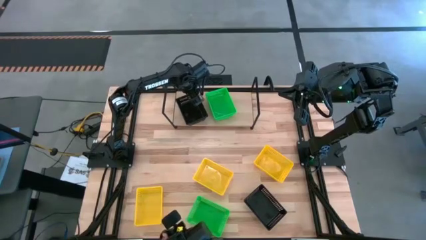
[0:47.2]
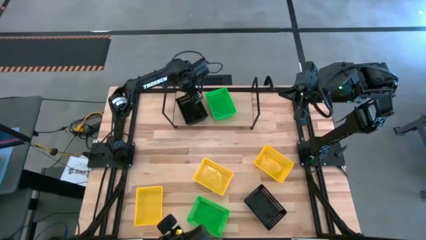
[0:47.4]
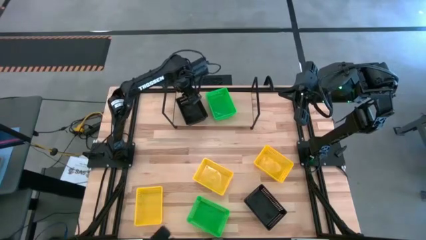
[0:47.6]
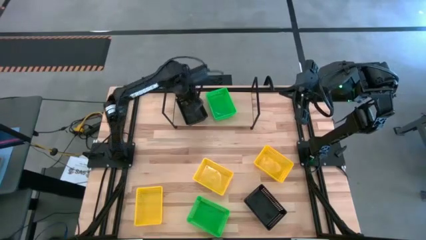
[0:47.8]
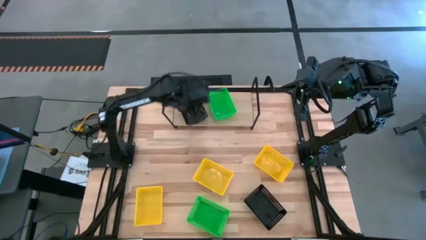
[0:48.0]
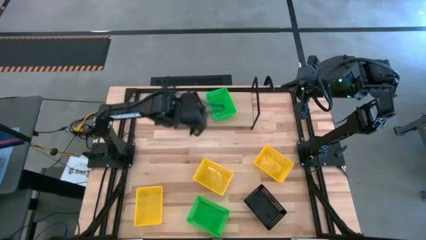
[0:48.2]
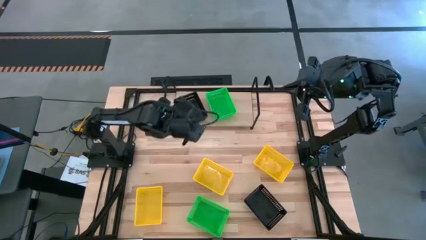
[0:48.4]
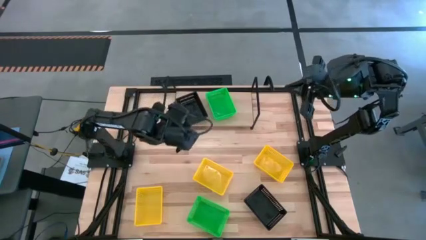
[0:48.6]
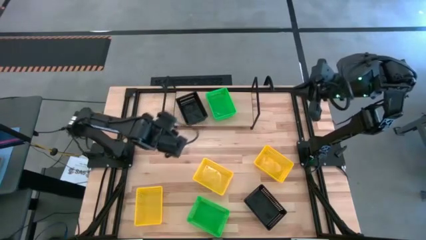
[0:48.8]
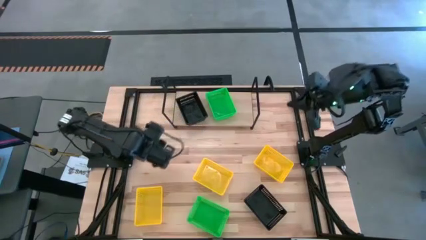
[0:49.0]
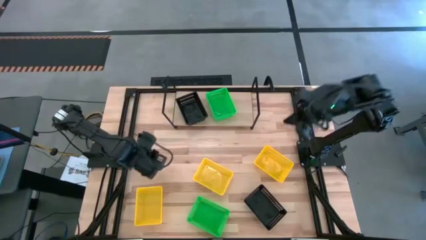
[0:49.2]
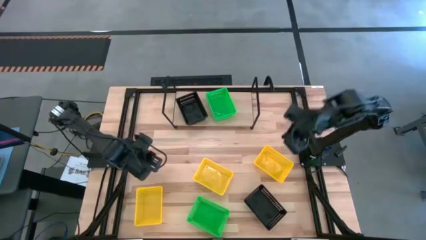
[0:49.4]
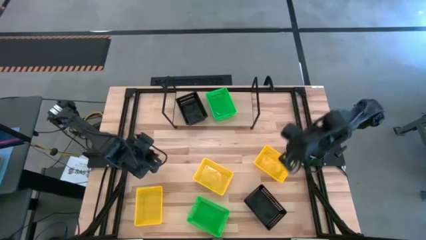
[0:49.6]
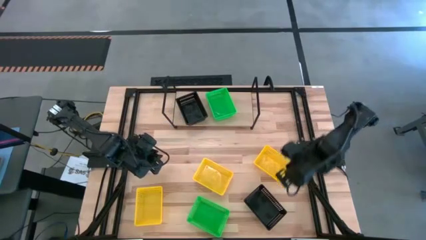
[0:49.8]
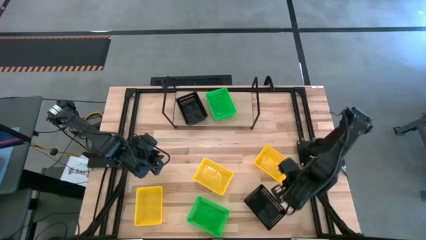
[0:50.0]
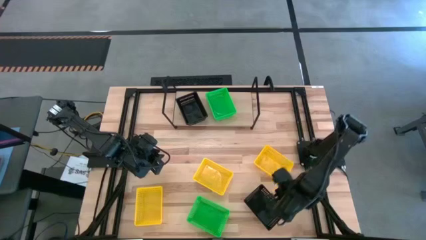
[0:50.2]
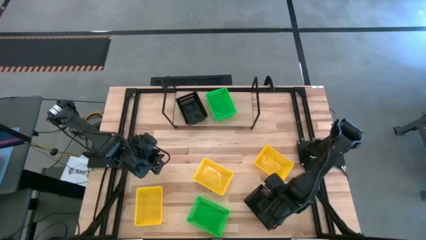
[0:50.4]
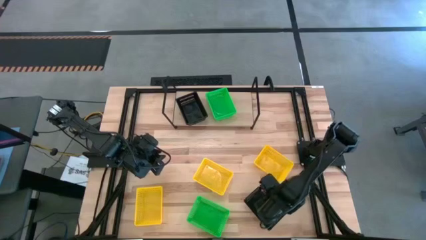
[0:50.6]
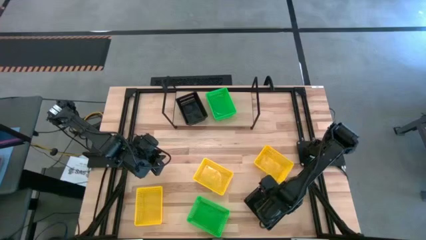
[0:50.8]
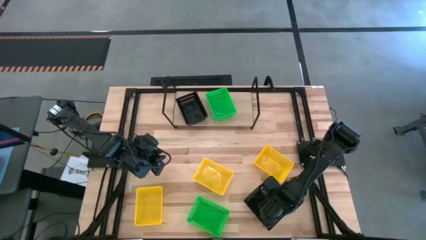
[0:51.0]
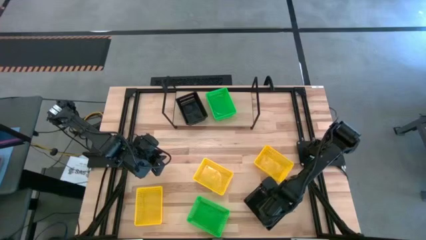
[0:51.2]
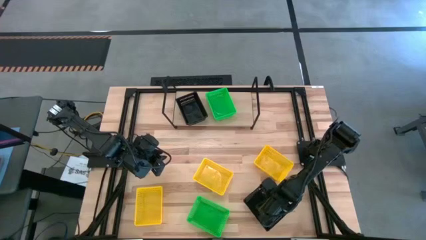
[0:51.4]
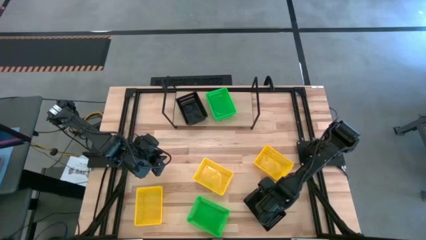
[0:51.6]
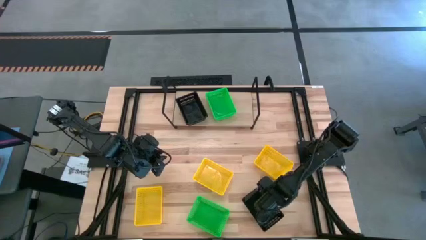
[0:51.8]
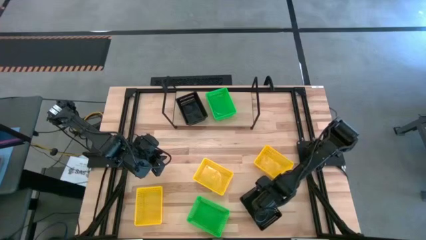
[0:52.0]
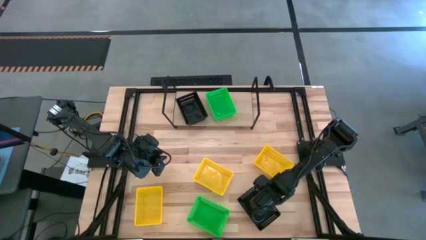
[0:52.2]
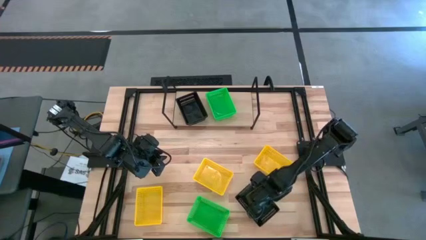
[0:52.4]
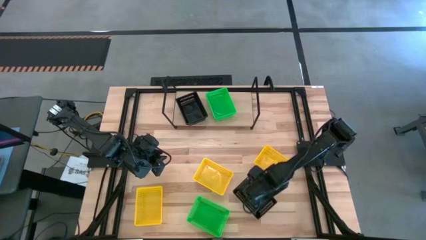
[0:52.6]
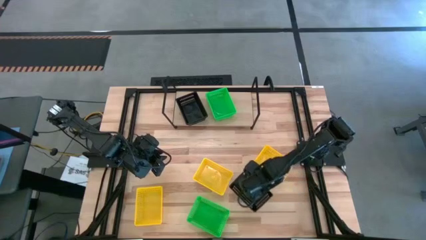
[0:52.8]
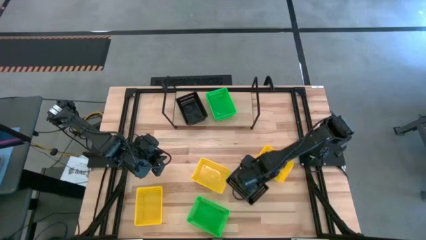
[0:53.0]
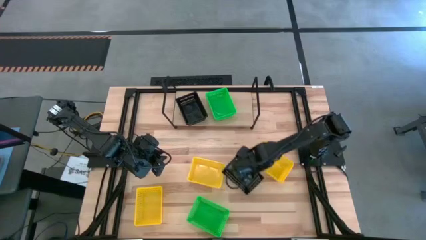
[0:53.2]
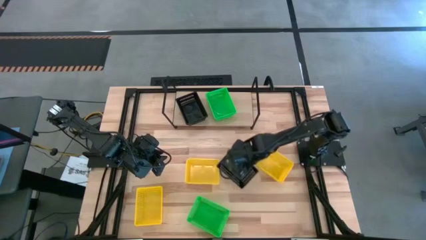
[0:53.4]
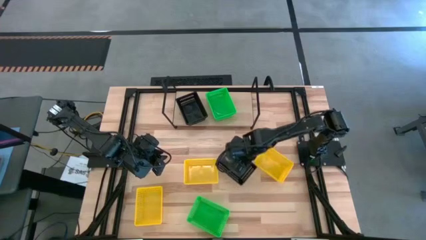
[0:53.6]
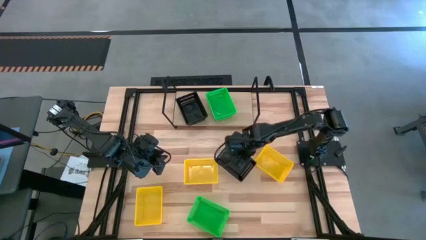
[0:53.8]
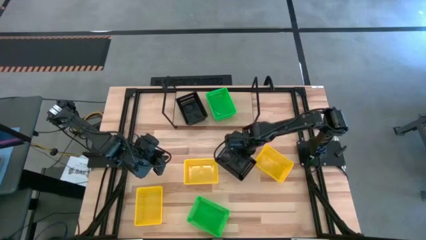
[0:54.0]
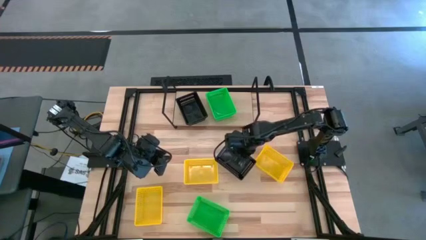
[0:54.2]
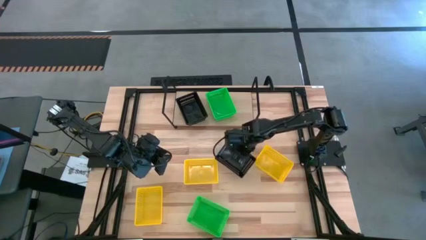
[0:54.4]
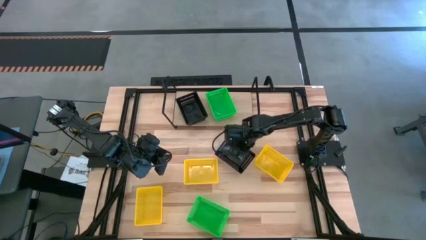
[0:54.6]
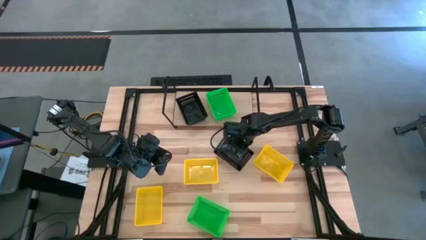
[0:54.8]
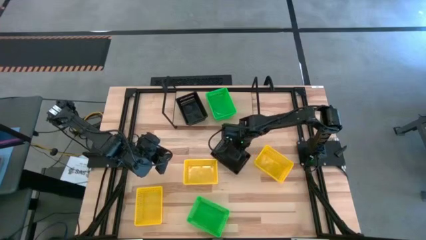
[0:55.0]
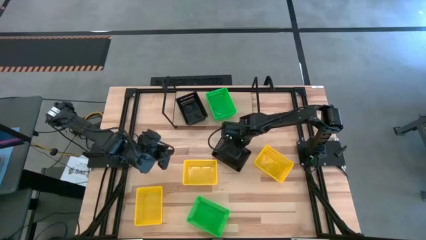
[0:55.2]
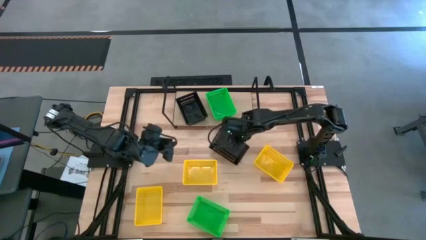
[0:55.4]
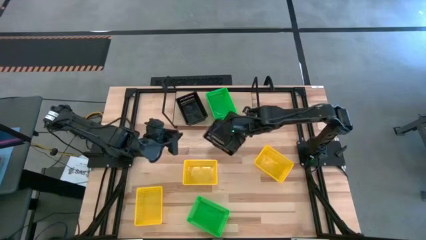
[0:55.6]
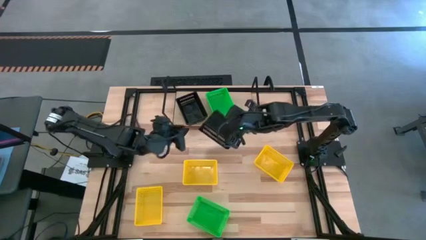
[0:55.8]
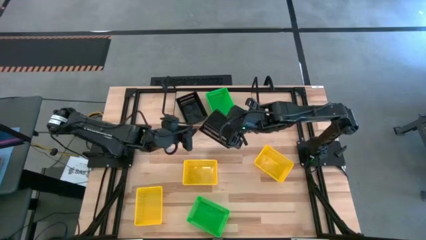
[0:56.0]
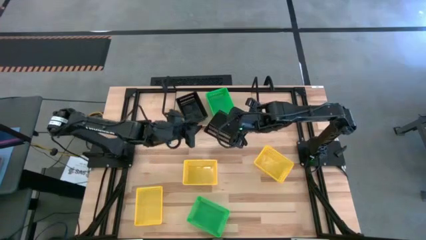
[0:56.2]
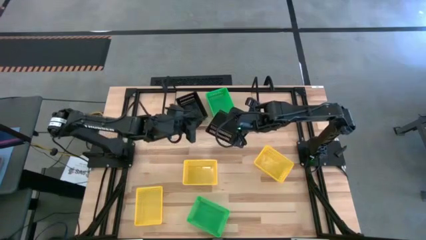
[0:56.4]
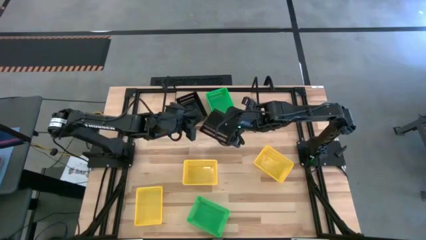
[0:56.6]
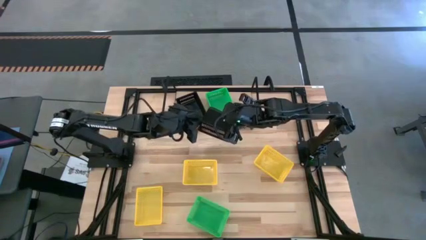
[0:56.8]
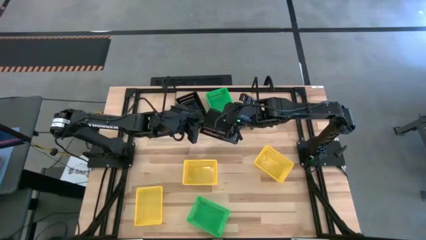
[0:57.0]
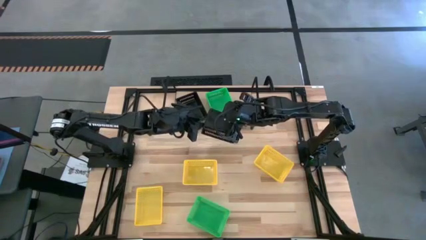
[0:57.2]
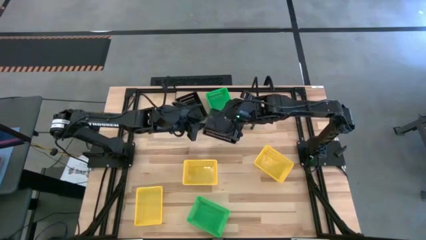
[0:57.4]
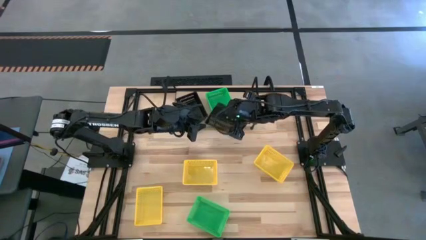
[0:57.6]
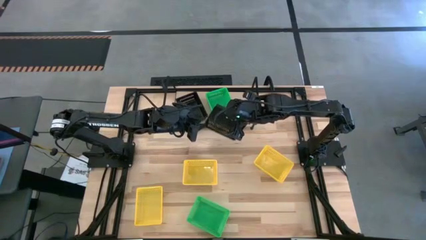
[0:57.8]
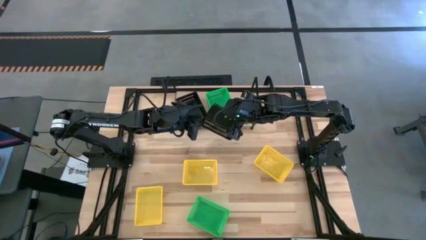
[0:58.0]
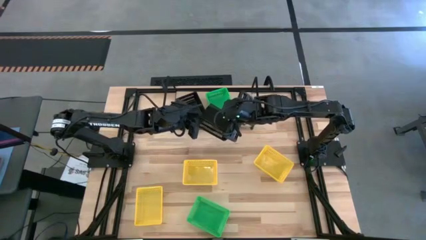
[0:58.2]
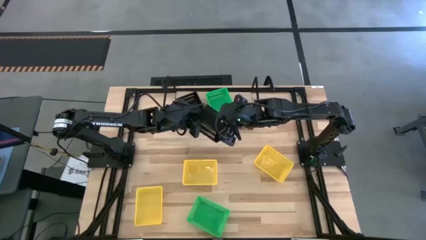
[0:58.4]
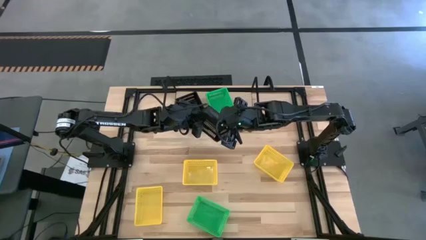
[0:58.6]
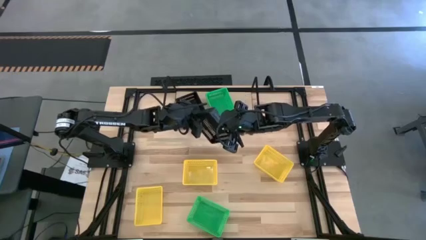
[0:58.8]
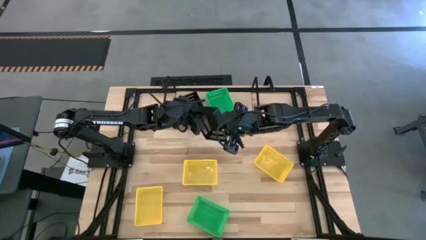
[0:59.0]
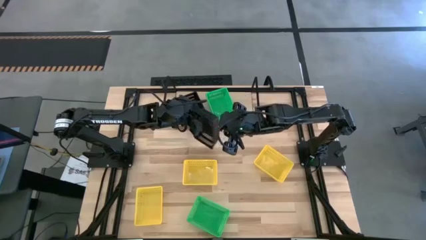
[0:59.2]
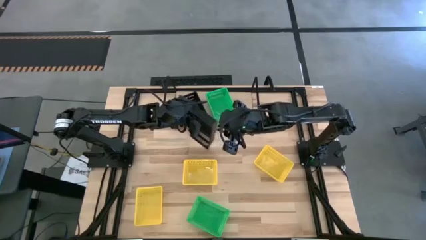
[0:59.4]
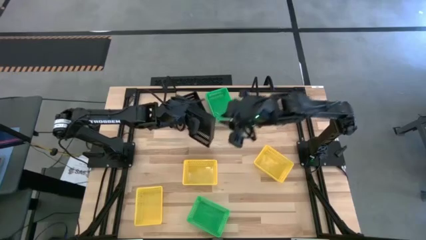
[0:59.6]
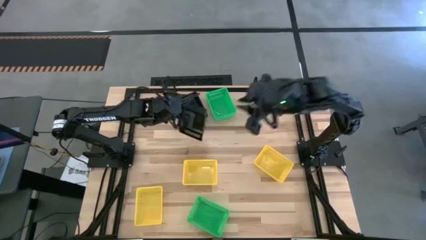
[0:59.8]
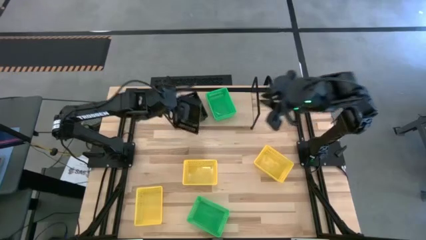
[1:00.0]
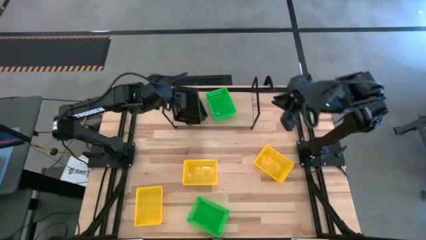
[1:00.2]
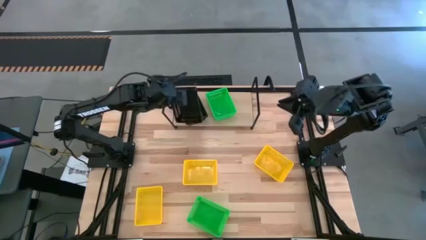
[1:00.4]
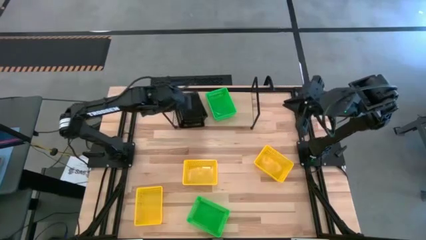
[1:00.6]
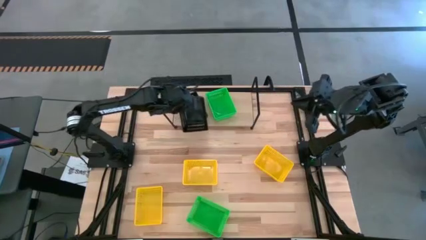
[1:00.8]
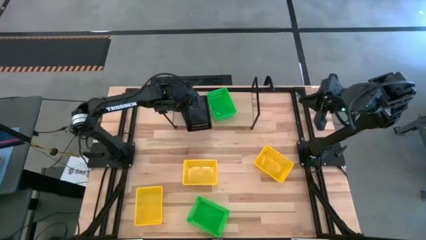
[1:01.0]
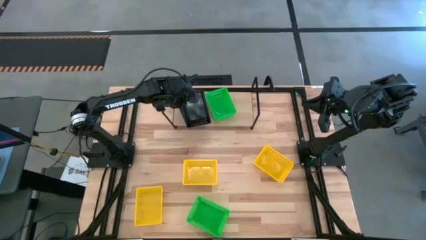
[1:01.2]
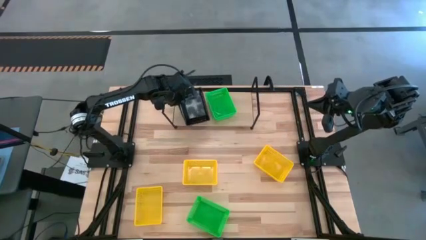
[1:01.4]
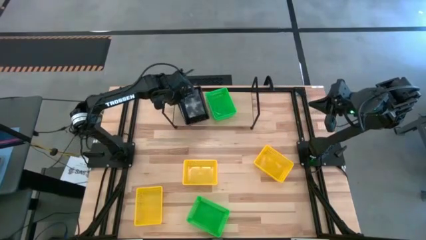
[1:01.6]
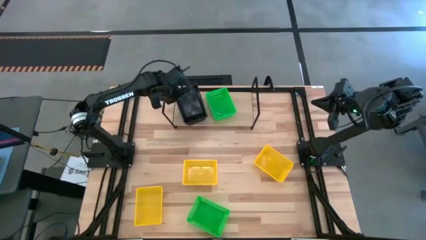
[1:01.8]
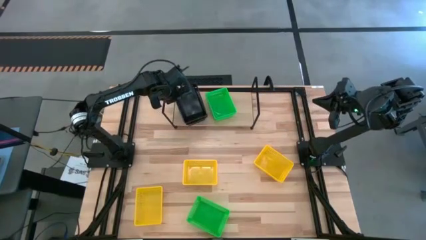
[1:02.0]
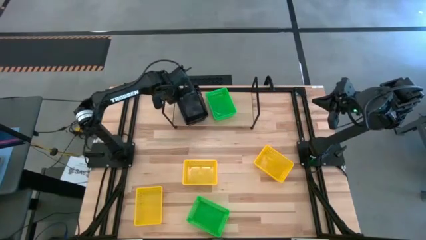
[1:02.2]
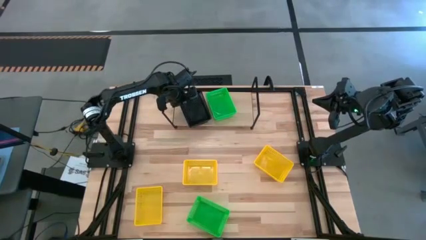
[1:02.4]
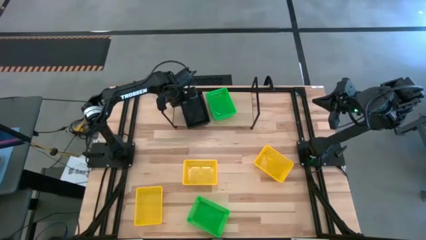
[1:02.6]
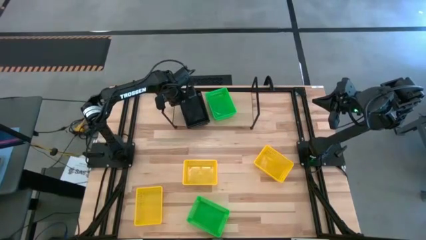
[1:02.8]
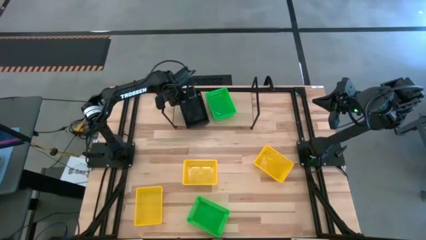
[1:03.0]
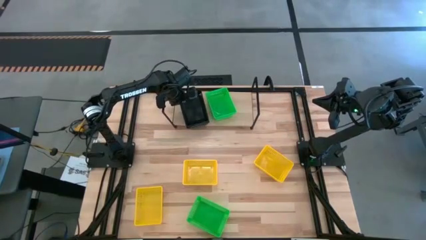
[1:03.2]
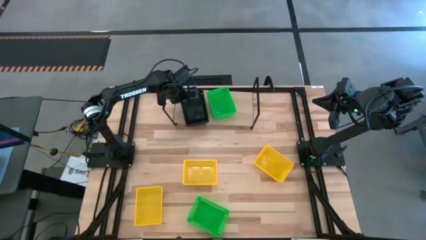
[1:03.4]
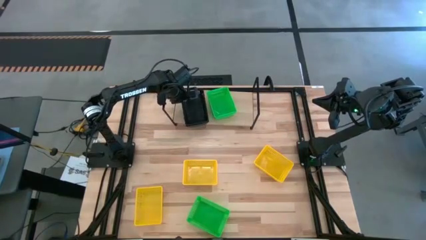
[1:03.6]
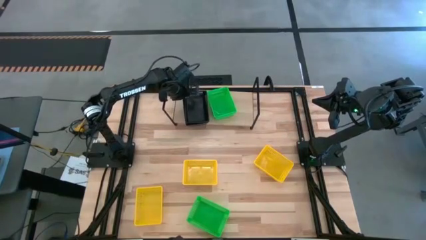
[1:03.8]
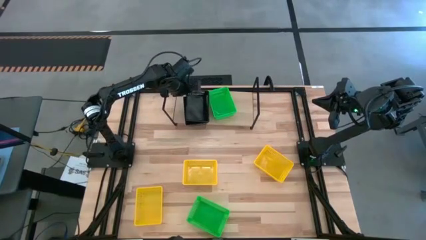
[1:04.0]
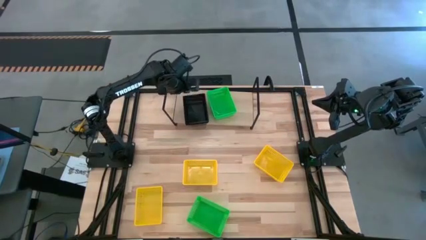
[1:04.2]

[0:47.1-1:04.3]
Task: Stack baskets on shelf by color
Stack the black bin on top of the black bin
